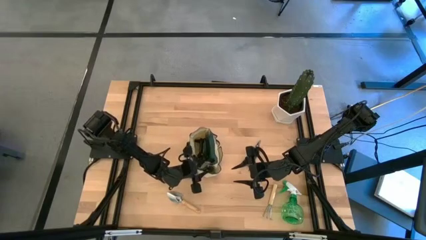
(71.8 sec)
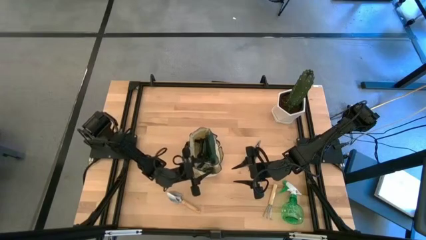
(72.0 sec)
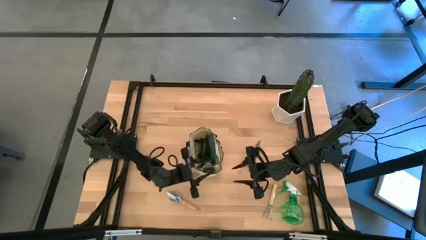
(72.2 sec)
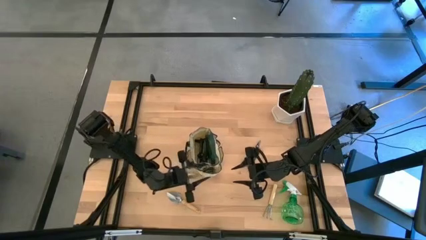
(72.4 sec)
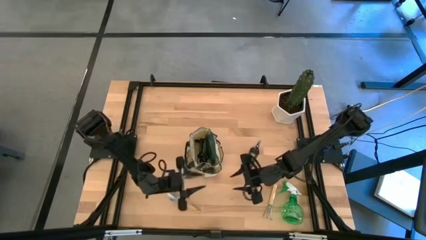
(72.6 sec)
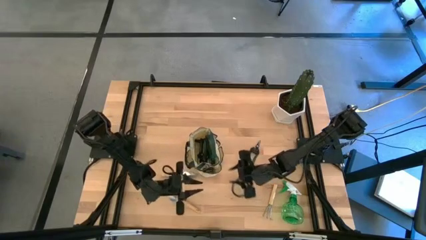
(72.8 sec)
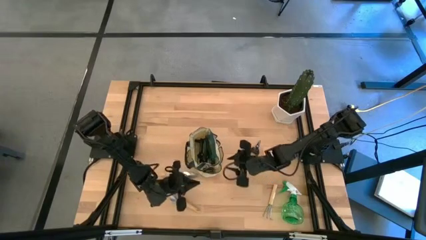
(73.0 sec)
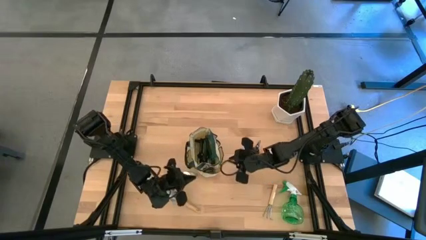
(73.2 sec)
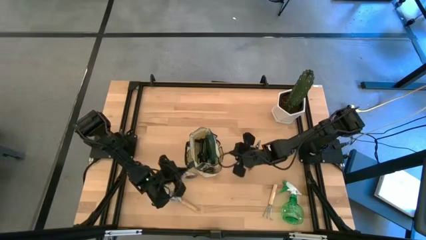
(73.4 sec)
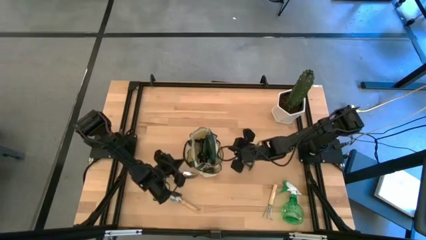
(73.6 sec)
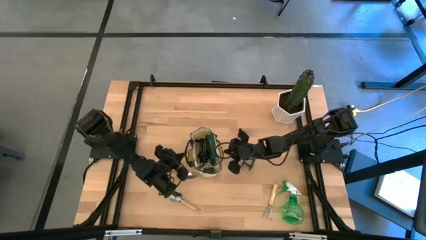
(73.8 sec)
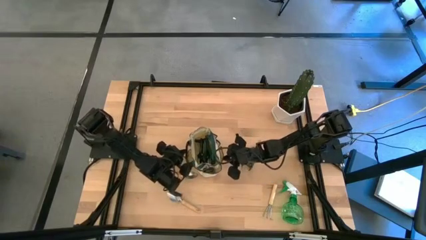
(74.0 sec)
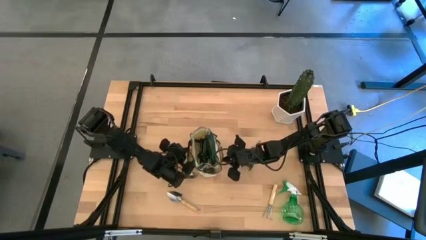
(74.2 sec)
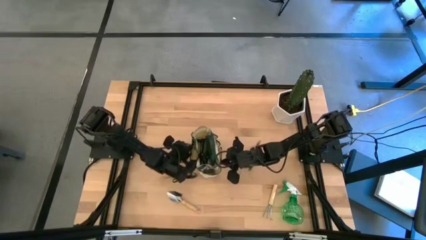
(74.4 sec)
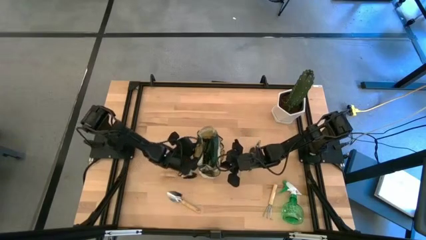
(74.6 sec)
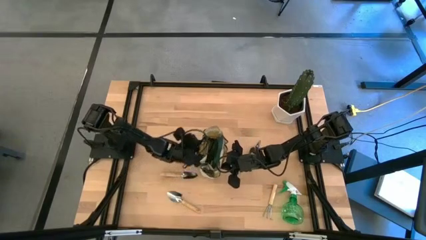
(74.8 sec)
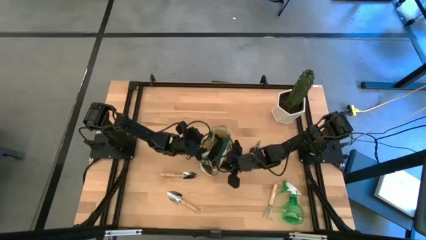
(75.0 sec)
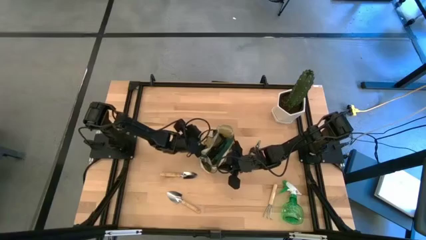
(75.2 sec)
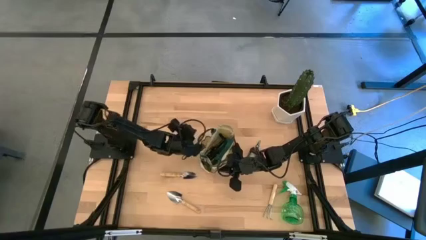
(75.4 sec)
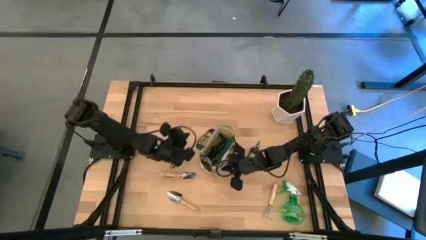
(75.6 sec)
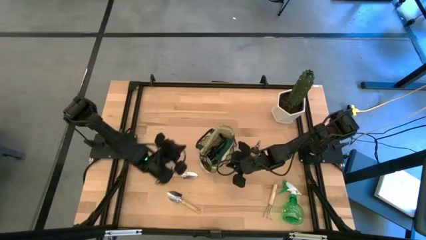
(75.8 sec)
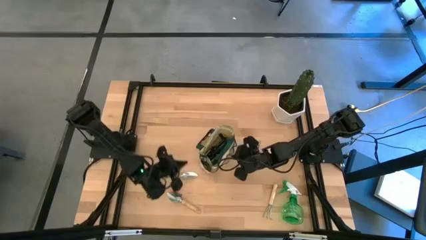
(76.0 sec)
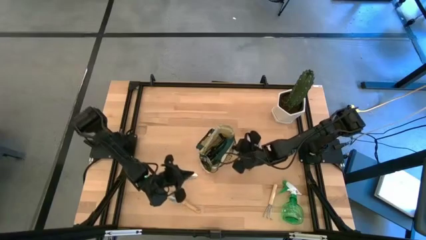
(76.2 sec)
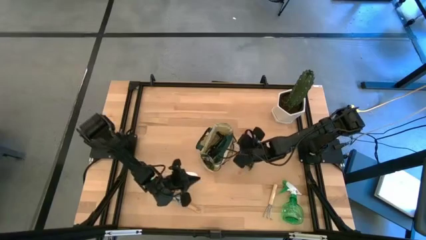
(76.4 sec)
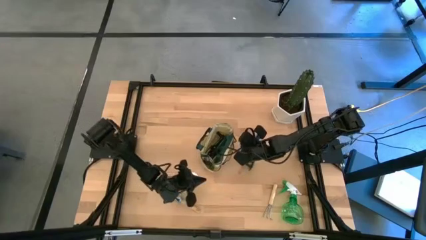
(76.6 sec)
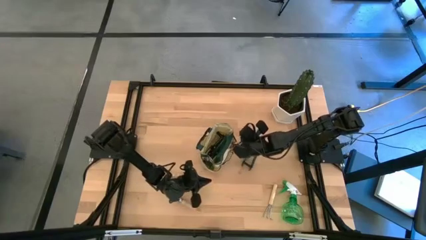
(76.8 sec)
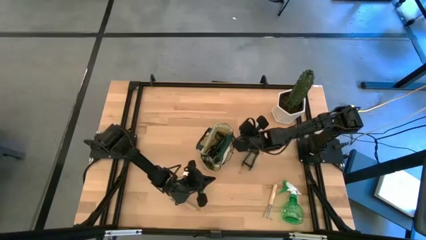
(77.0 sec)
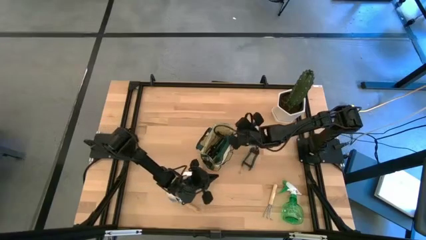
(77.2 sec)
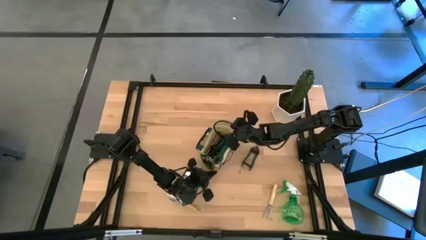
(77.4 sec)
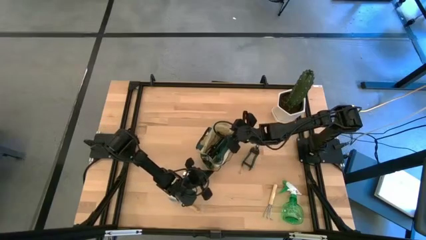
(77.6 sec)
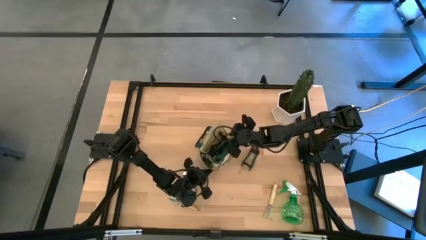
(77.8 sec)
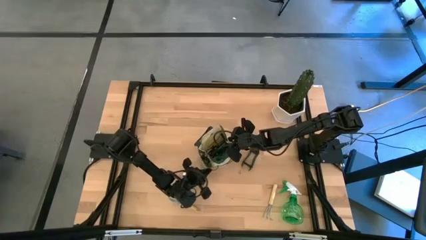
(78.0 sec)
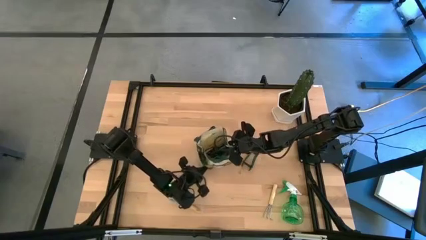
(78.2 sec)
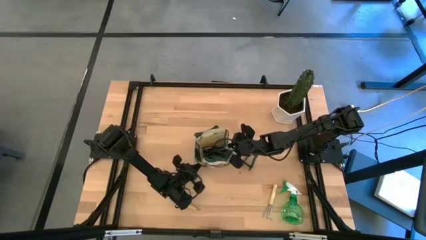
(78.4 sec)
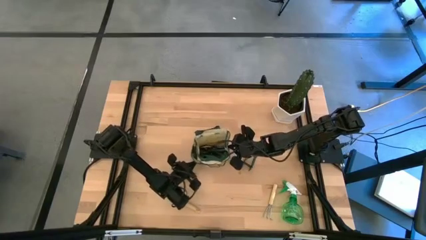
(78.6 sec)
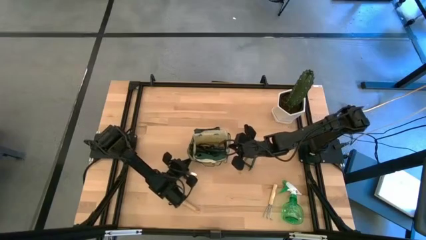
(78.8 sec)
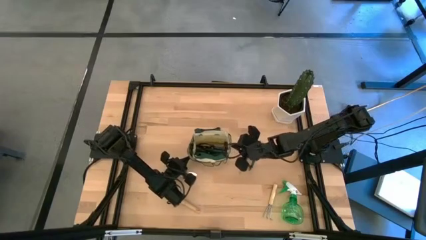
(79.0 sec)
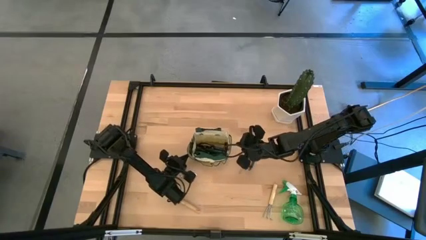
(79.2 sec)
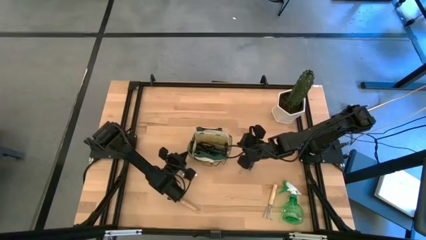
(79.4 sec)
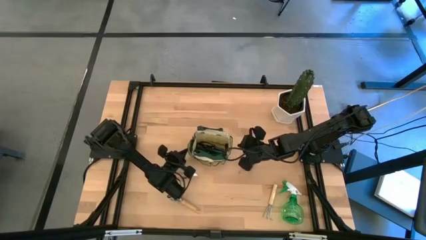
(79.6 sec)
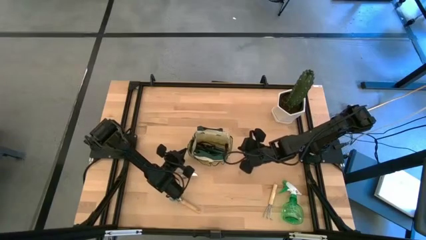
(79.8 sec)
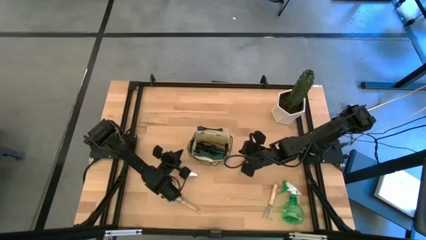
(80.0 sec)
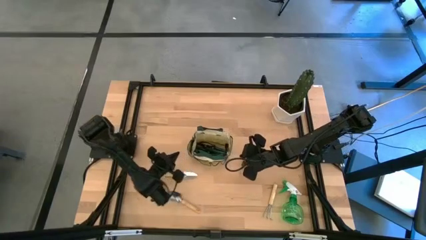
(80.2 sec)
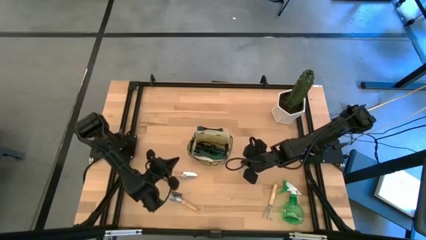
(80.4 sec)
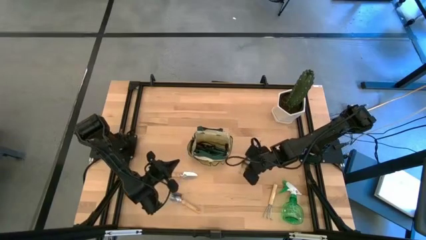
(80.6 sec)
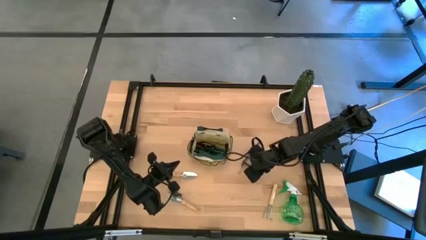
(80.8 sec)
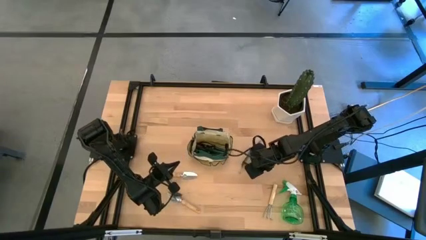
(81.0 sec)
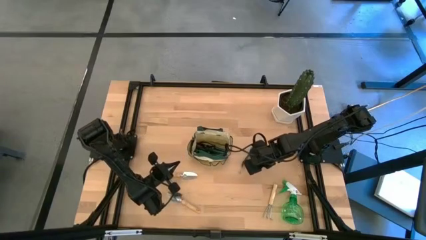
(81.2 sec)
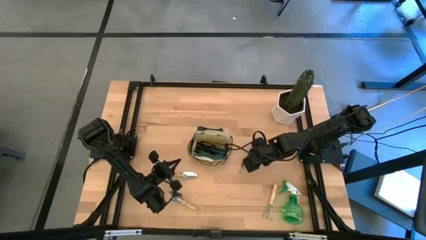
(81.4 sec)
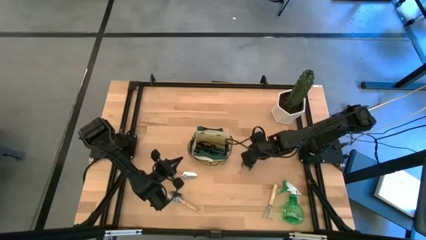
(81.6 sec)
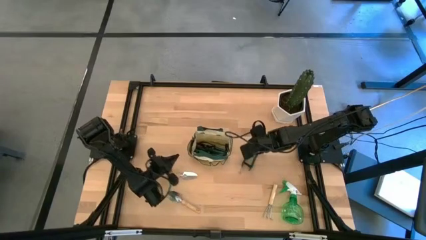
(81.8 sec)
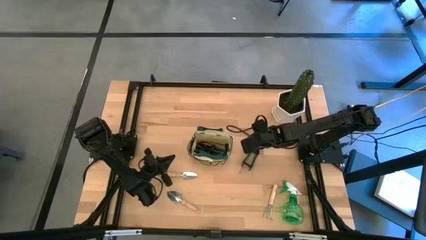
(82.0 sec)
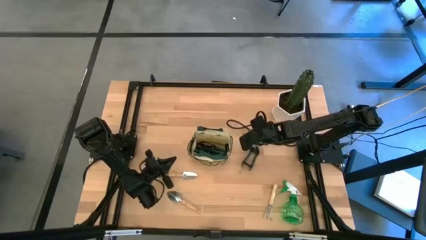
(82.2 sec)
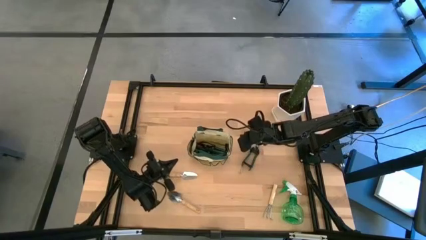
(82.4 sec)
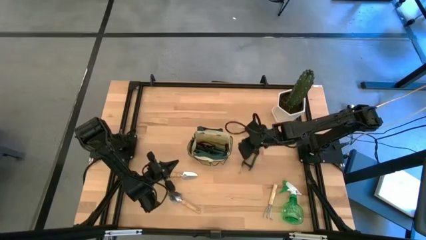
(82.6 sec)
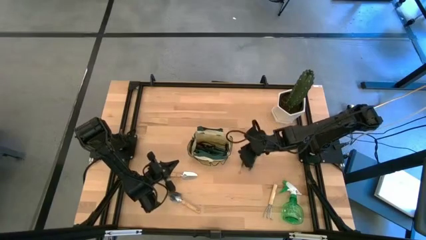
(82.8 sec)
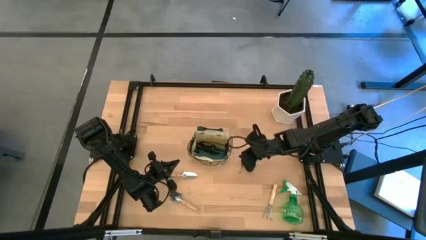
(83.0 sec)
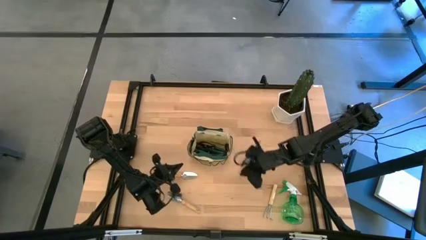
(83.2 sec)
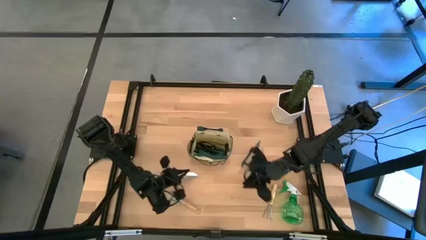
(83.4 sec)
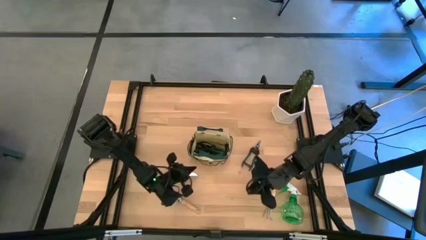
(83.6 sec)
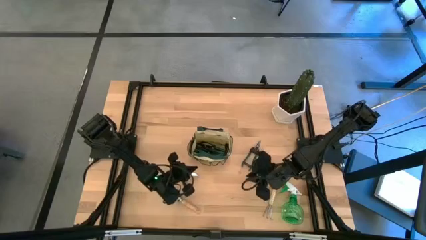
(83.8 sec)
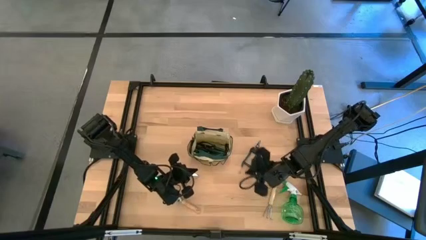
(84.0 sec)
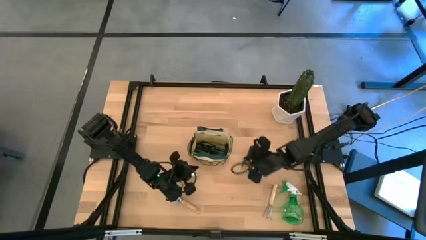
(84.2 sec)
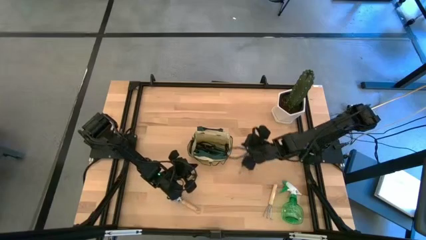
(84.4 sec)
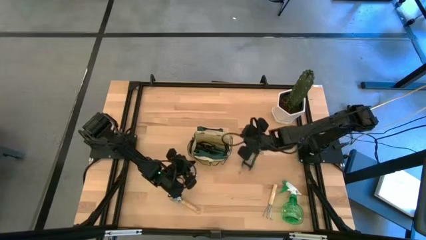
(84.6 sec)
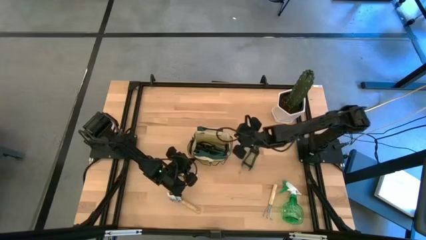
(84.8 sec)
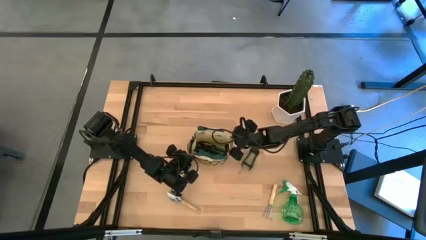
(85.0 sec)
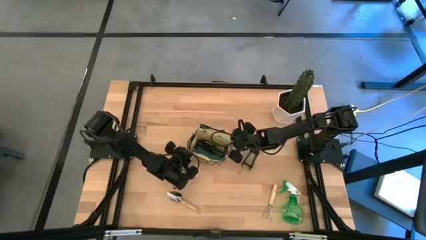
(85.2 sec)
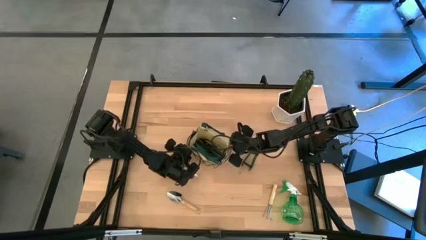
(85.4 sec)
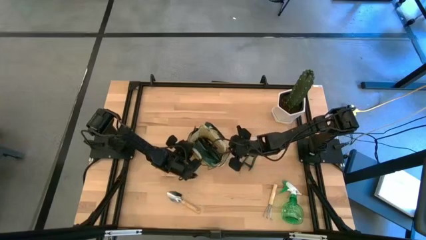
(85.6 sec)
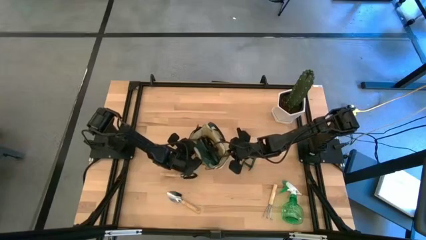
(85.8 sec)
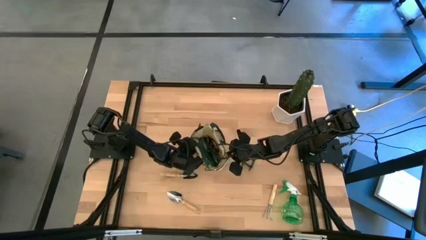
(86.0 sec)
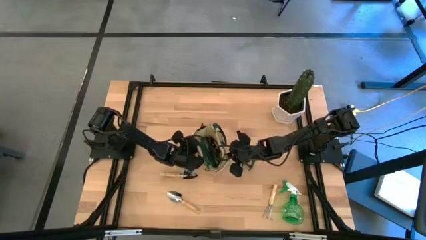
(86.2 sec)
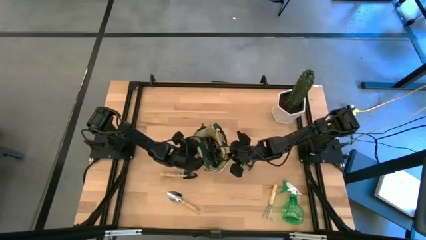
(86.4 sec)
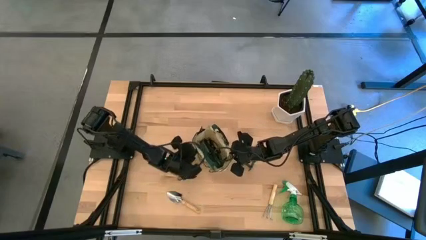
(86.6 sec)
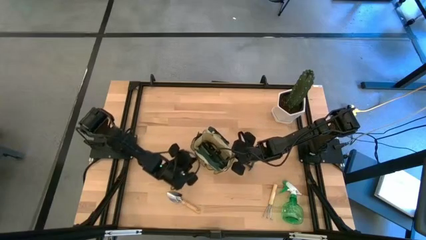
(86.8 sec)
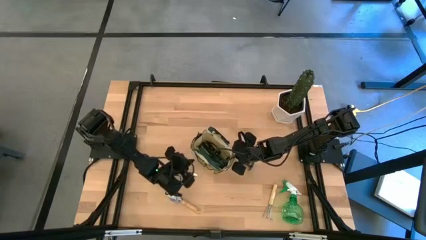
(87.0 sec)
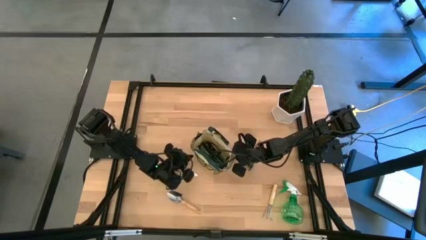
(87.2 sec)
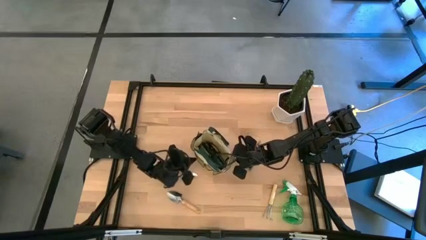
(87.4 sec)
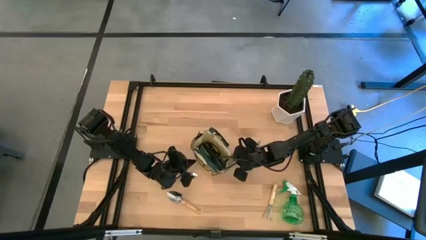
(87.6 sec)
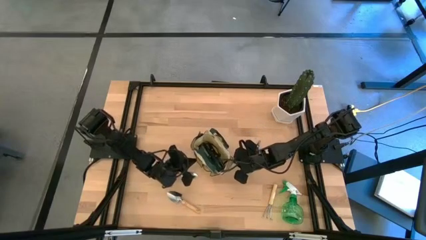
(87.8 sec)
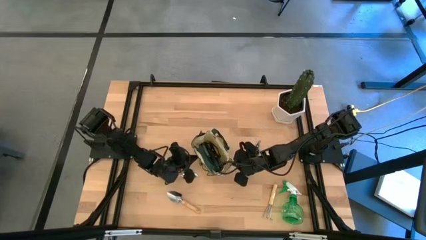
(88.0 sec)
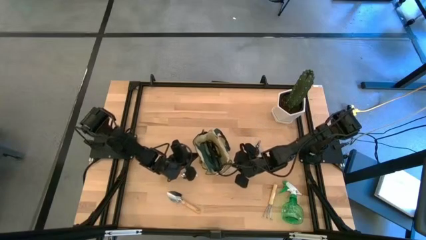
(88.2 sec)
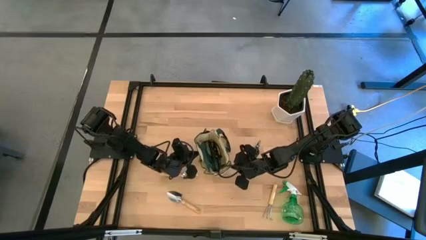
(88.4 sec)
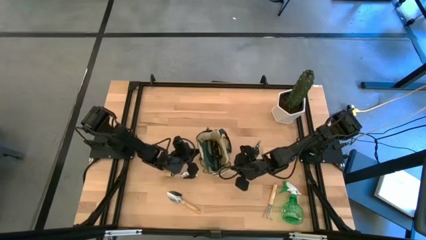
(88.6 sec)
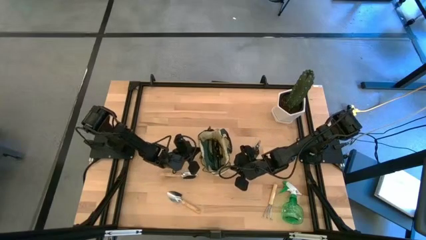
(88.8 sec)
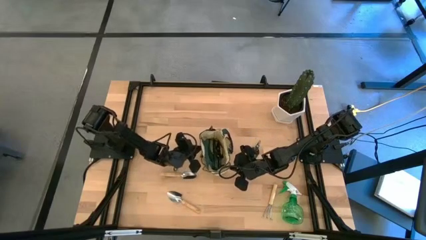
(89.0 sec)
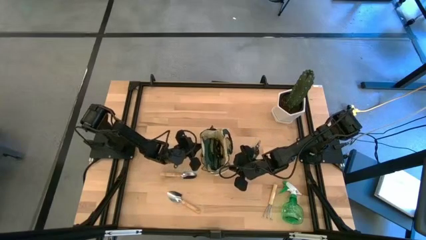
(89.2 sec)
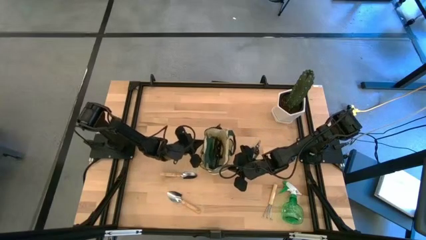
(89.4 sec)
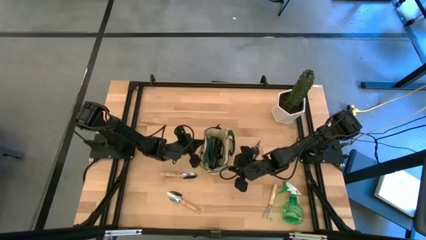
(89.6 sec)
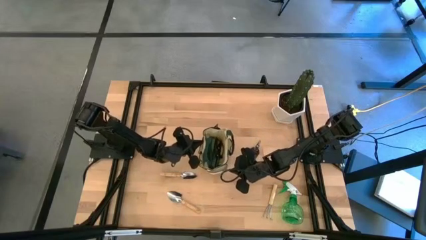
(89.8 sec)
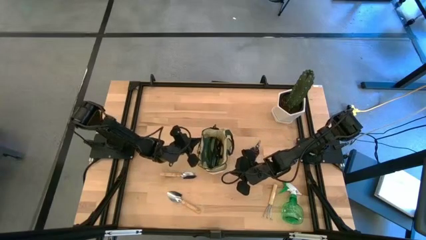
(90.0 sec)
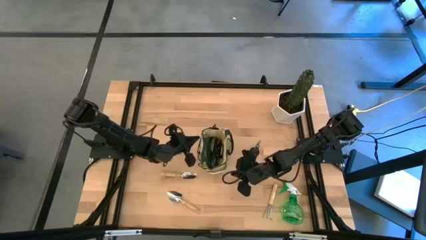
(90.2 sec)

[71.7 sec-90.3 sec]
Task: Pick & Place Garden tools in Gardening bag
Adjust the green gardening bag
